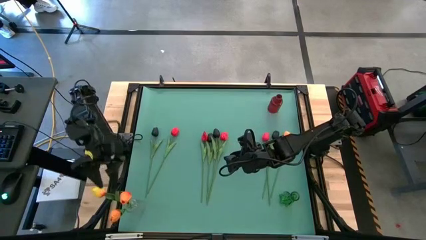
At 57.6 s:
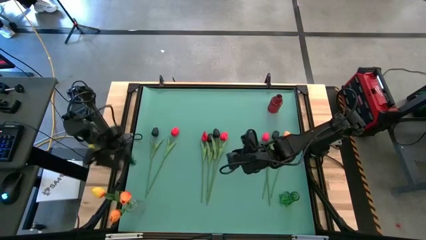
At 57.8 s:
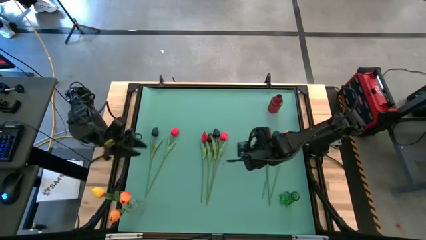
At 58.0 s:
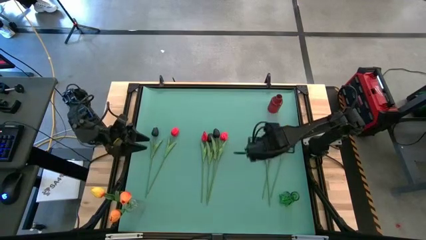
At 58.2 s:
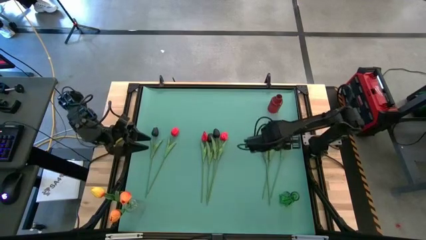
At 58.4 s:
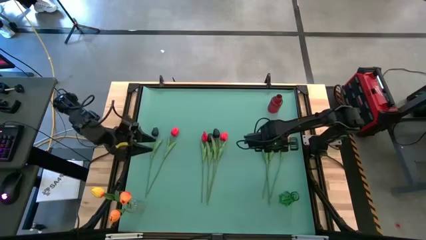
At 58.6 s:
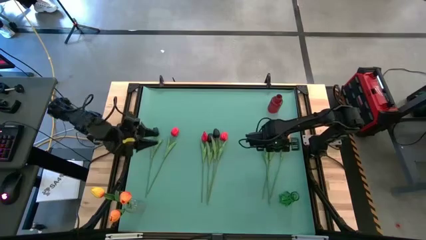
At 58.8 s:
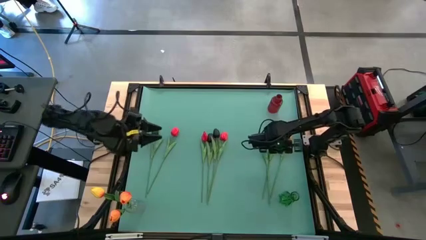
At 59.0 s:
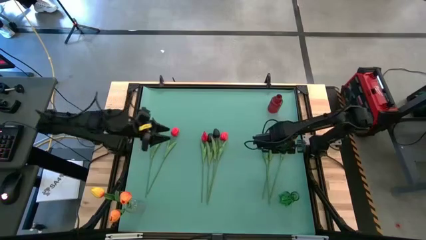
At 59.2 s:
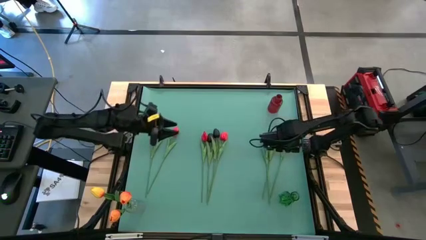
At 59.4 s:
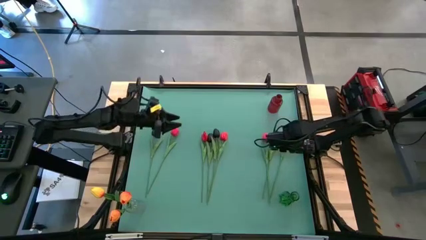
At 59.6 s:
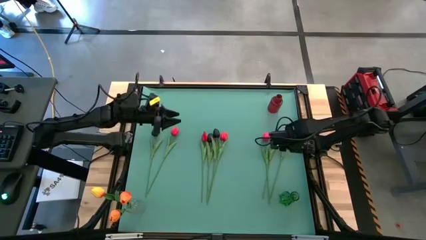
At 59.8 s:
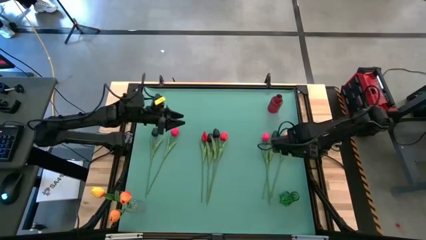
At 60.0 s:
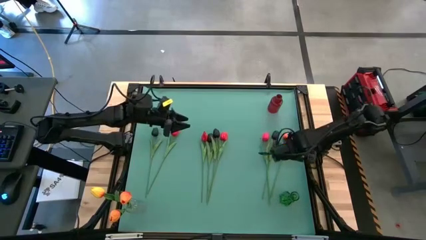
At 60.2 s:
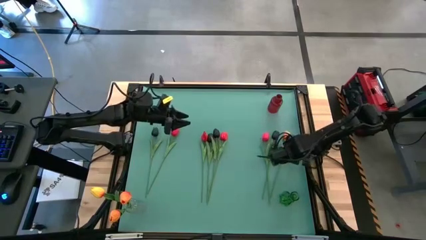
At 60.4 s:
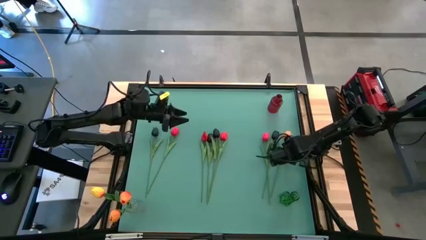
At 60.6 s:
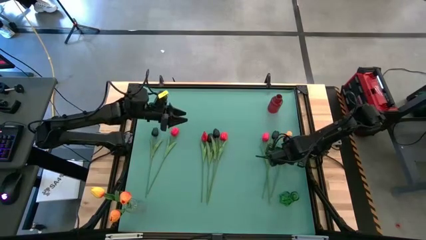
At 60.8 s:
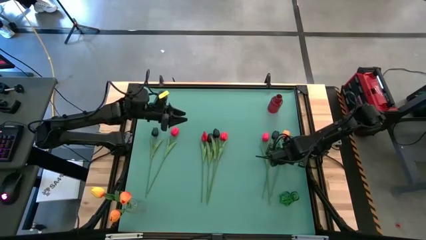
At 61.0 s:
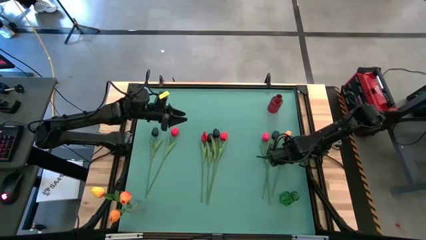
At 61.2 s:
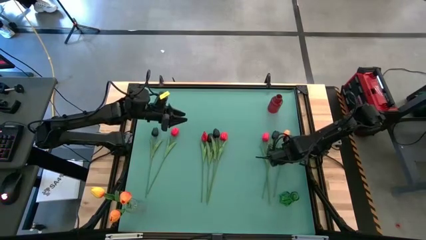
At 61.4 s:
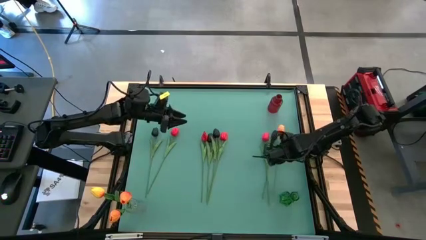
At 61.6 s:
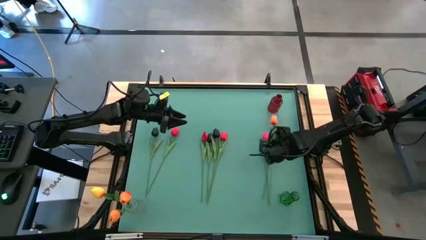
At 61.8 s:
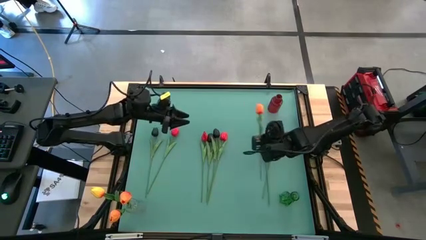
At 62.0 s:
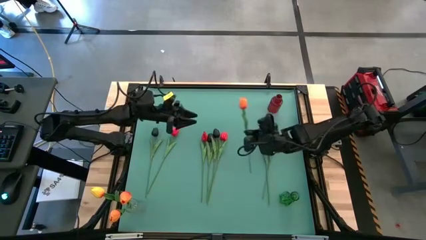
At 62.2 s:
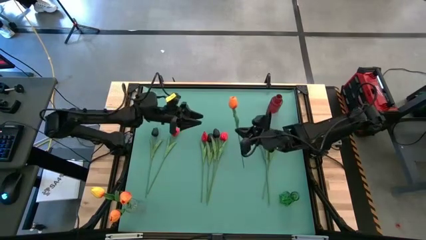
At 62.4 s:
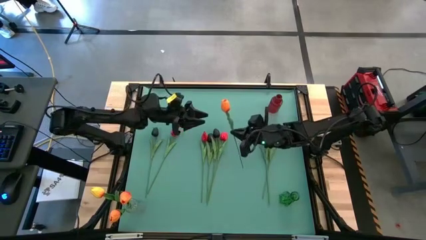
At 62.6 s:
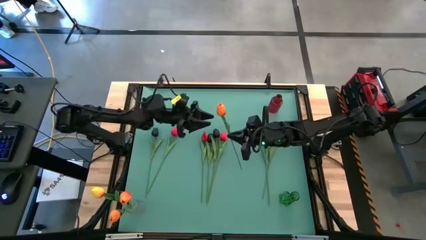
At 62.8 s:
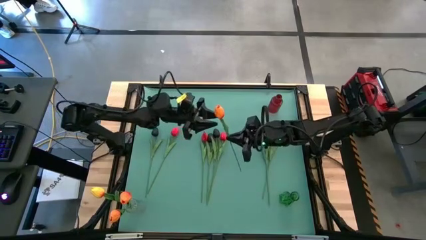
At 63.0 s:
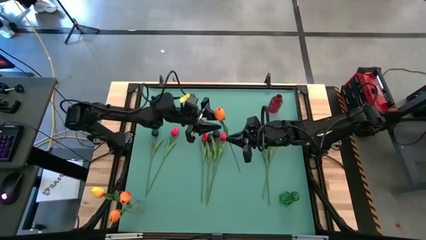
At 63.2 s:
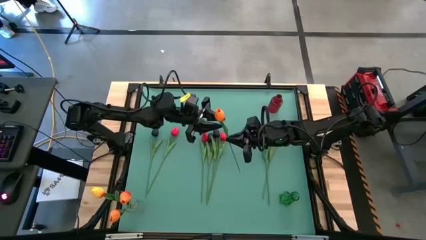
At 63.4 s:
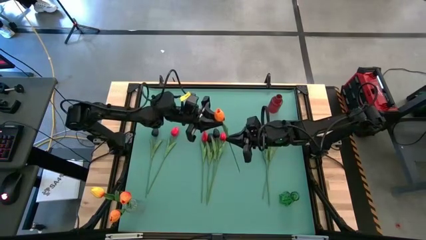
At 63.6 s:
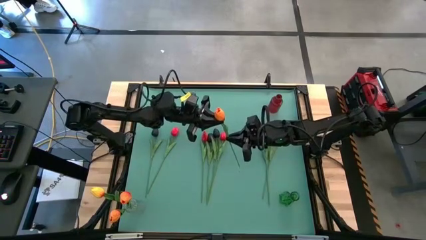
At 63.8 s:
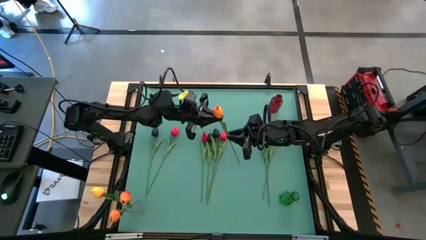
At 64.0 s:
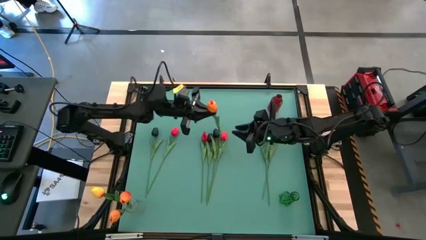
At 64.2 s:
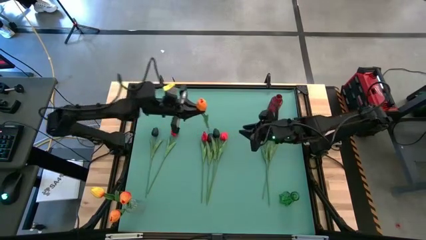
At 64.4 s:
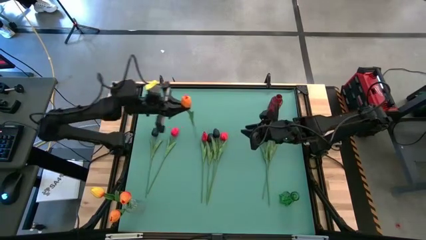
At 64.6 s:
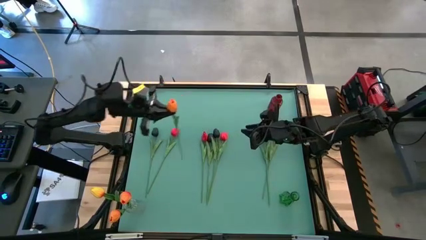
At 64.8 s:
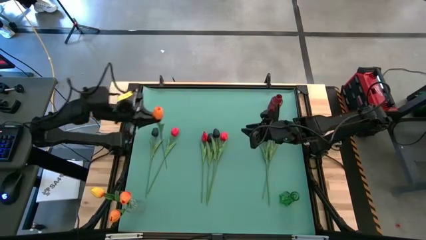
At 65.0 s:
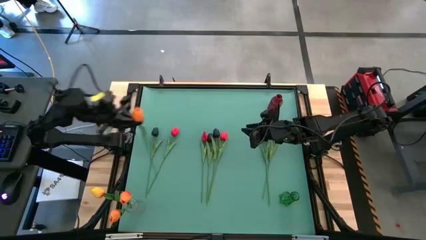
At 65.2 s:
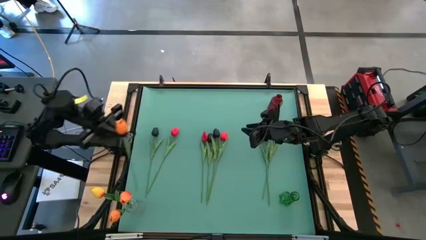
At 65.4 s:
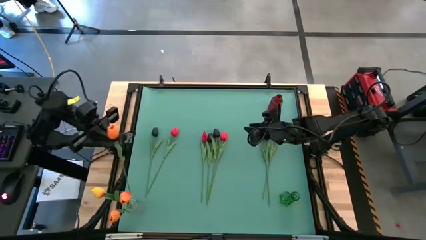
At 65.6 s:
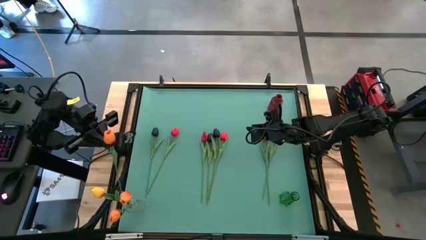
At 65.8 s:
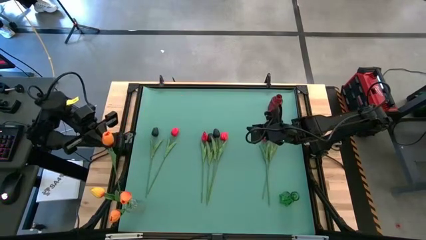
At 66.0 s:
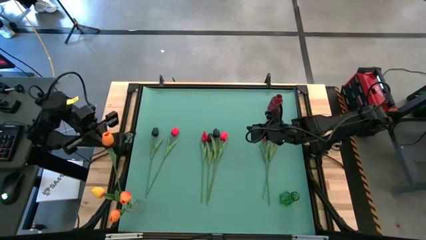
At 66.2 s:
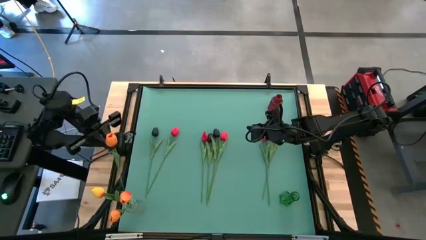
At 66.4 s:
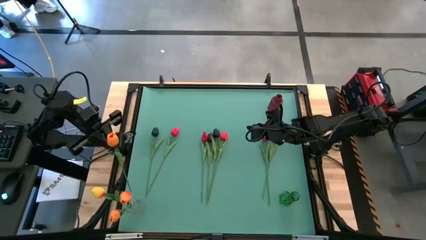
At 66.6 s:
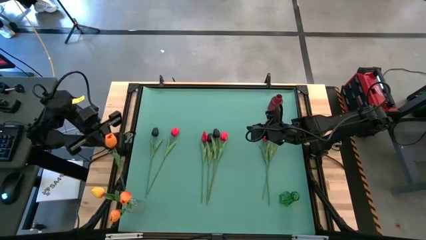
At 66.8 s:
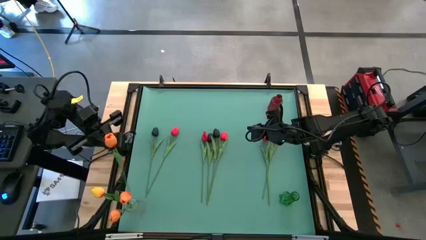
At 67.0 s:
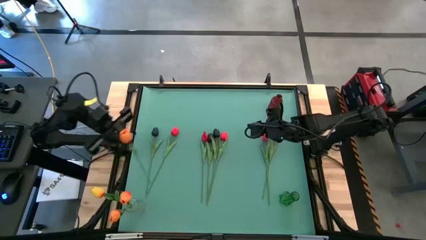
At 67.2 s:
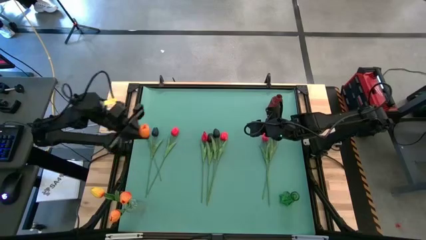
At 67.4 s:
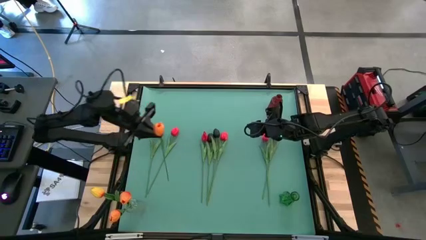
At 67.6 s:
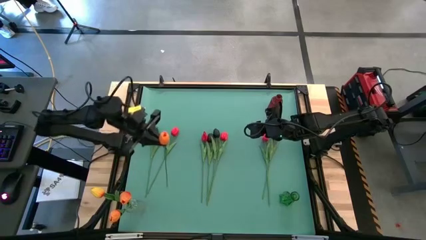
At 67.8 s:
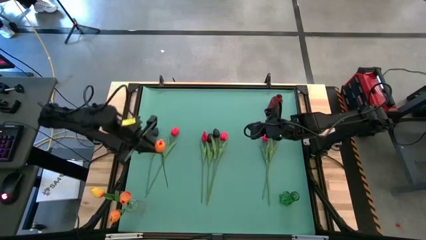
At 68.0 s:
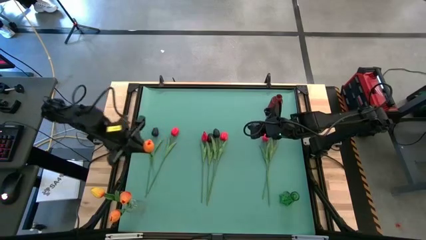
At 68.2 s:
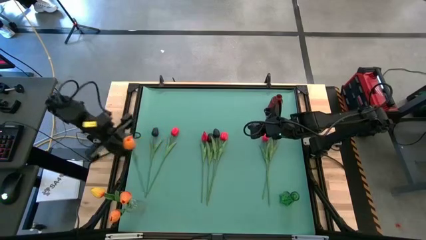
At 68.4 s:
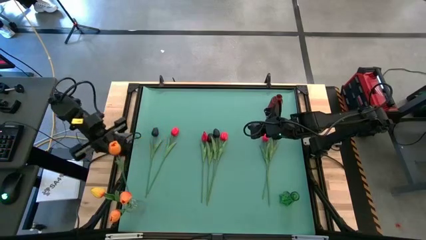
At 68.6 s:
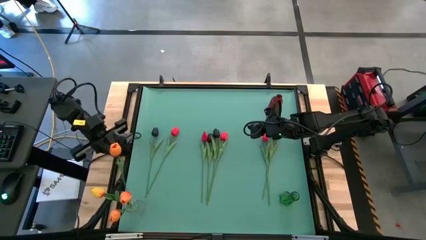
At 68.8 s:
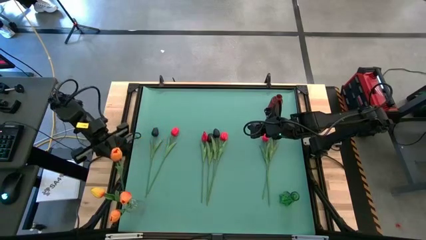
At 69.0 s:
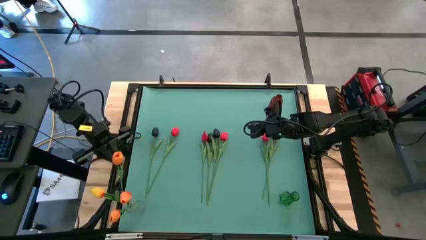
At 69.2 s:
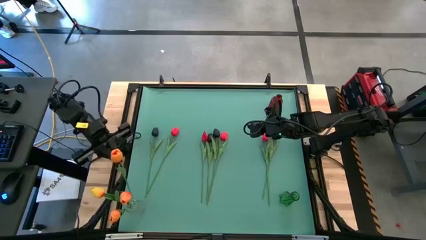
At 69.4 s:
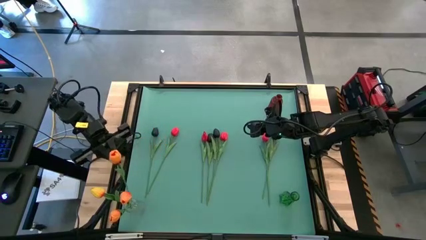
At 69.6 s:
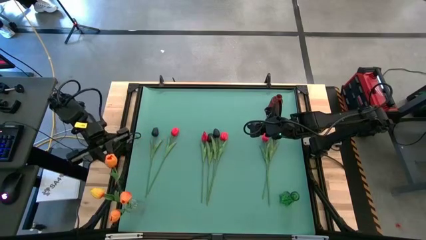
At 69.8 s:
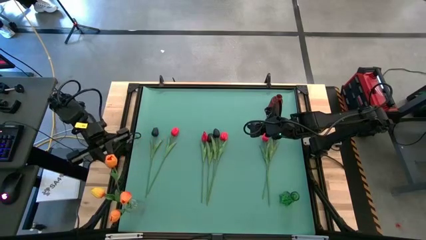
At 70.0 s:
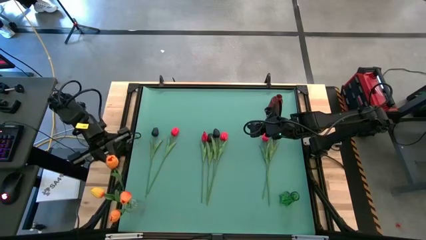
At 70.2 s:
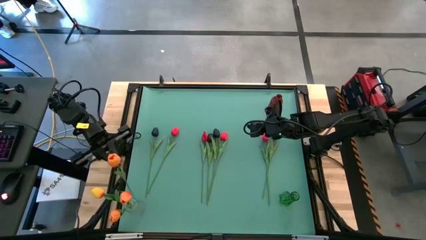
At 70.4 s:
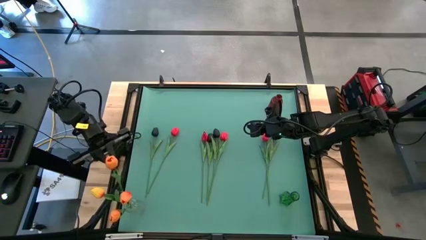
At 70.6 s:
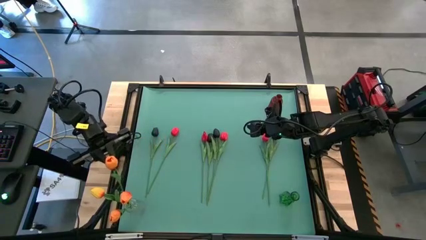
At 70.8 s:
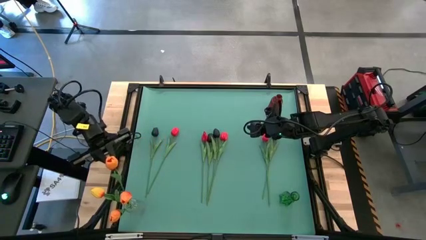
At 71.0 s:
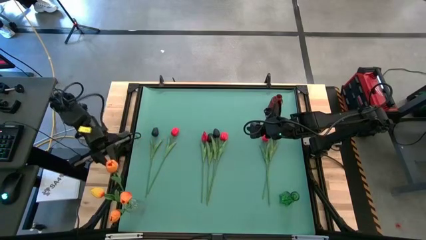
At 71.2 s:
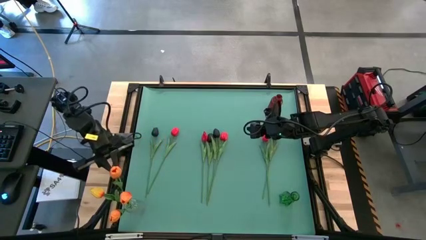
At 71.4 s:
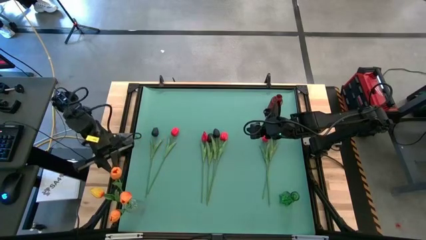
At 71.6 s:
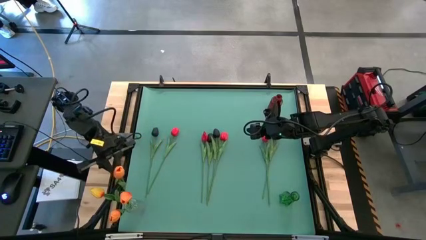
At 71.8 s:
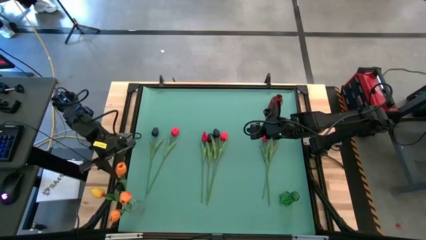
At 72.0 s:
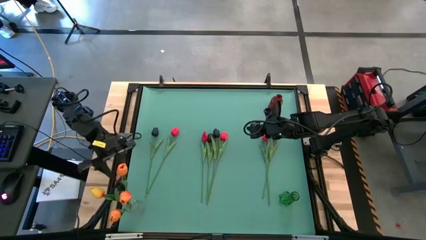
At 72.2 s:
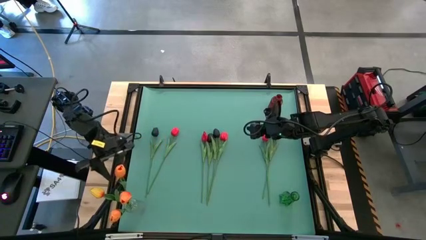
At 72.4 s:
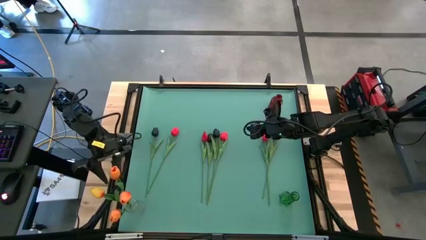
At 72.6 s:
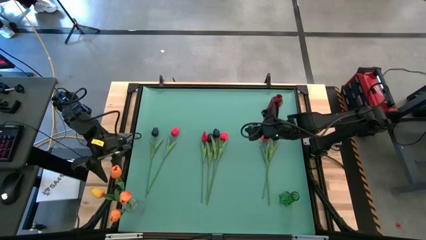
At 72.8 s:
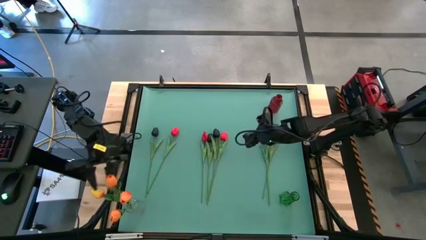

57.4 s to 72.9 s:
Task: Sort flowers into vase by color
Put the orange tulip into the transparent vase
